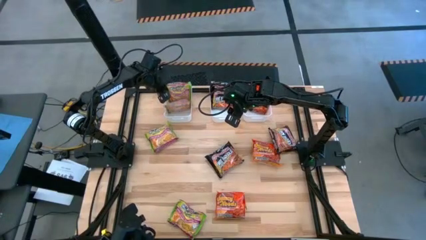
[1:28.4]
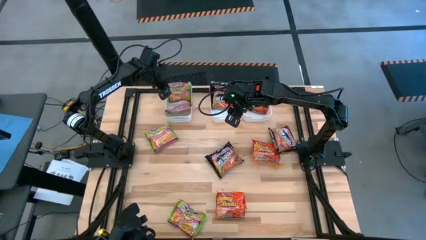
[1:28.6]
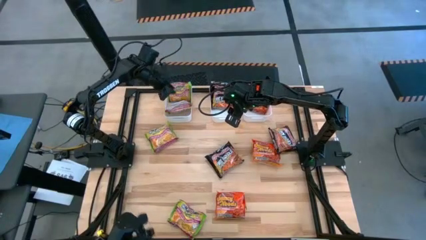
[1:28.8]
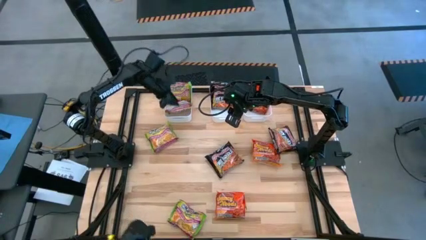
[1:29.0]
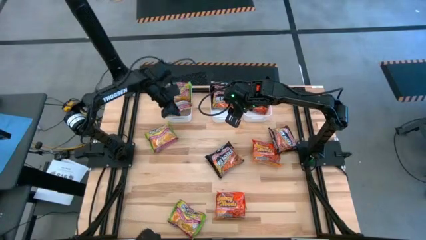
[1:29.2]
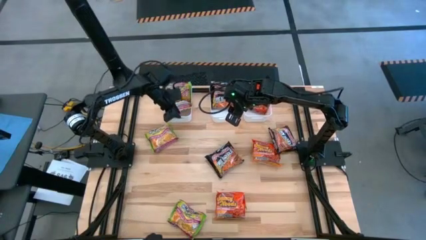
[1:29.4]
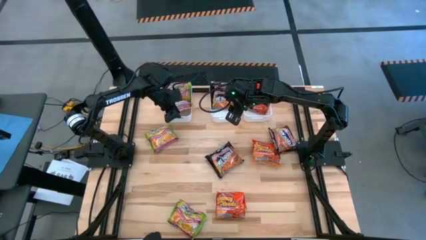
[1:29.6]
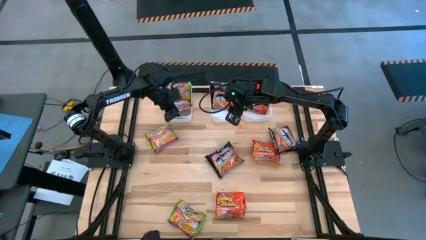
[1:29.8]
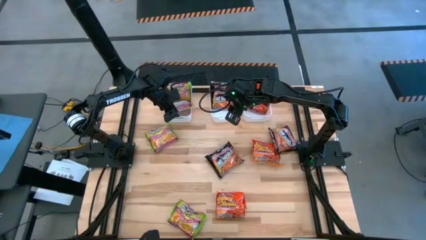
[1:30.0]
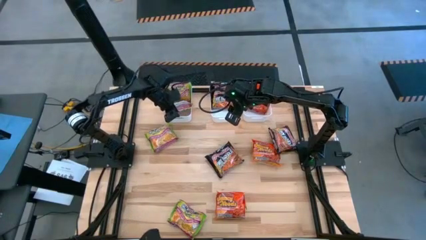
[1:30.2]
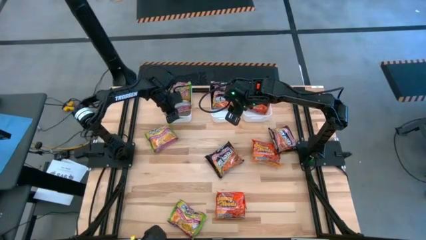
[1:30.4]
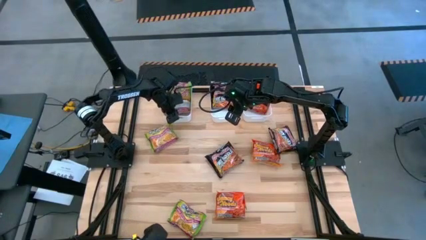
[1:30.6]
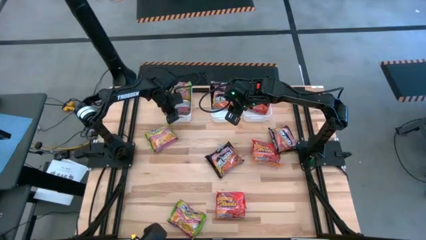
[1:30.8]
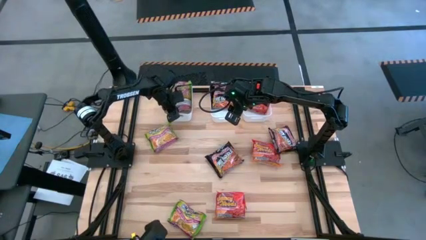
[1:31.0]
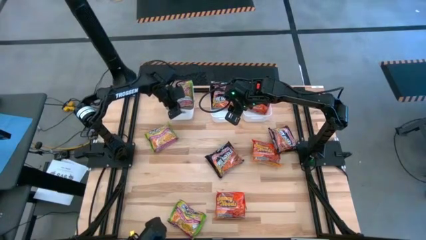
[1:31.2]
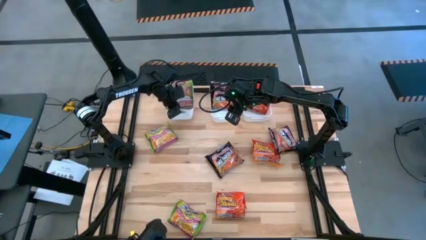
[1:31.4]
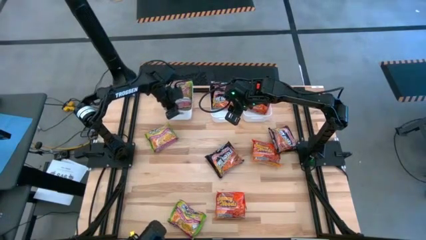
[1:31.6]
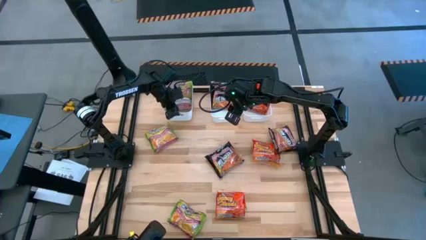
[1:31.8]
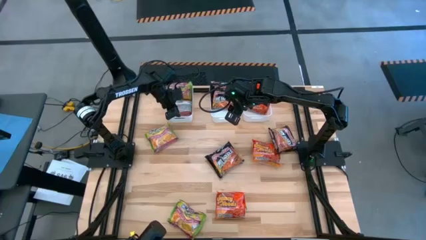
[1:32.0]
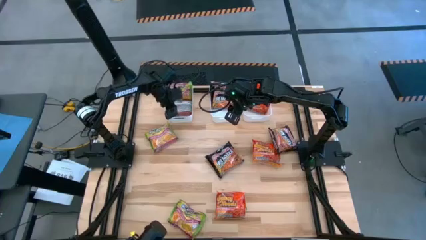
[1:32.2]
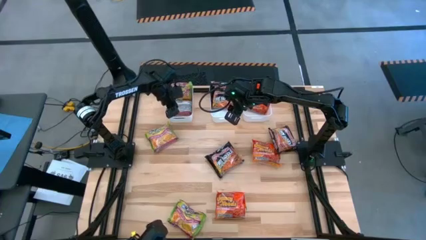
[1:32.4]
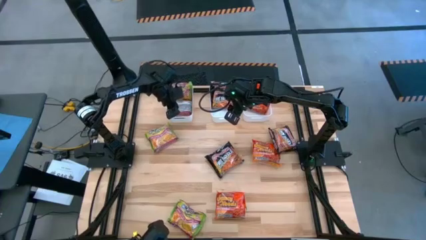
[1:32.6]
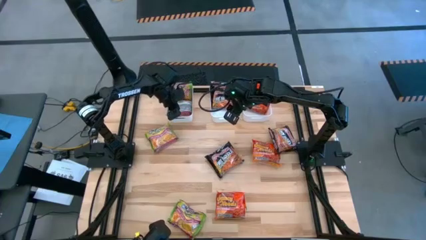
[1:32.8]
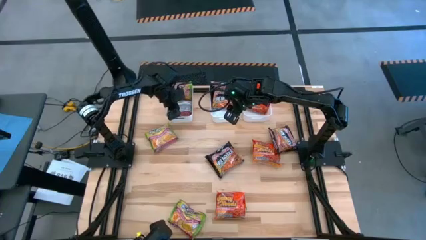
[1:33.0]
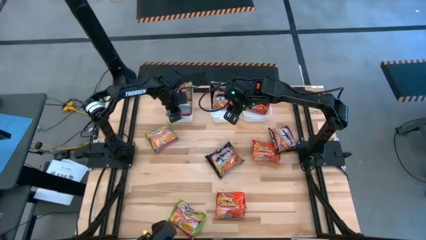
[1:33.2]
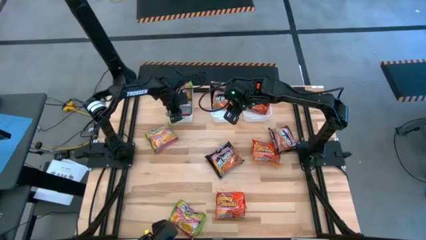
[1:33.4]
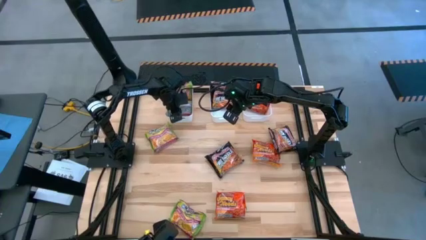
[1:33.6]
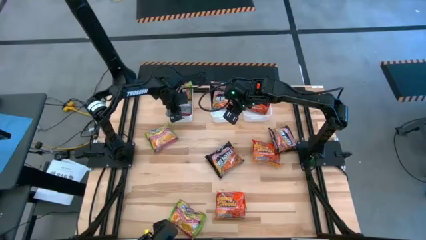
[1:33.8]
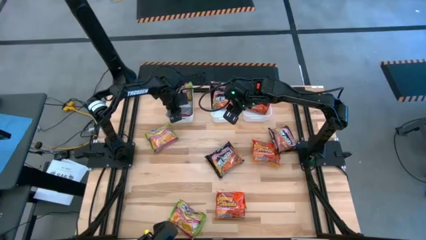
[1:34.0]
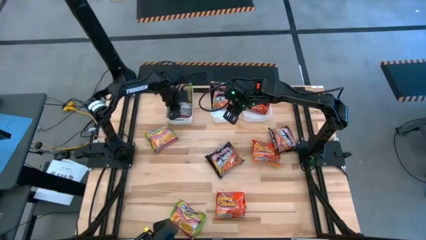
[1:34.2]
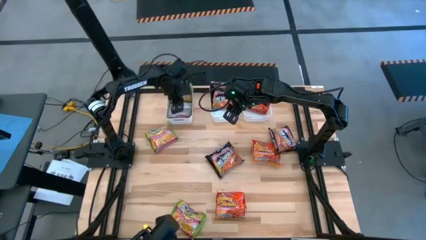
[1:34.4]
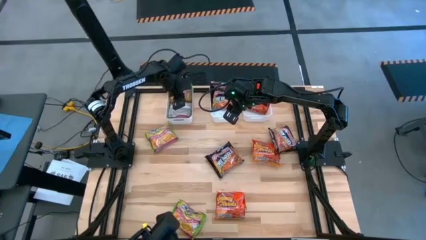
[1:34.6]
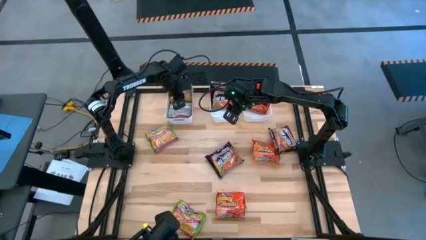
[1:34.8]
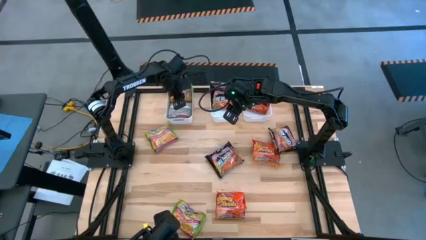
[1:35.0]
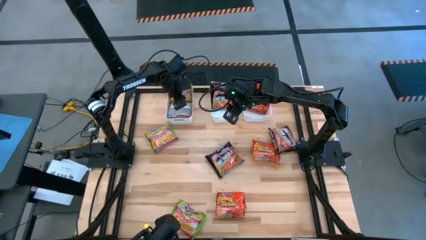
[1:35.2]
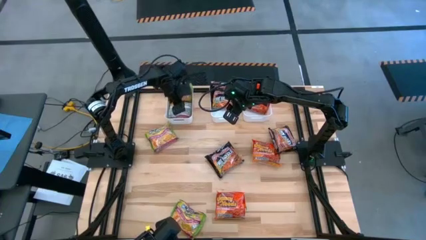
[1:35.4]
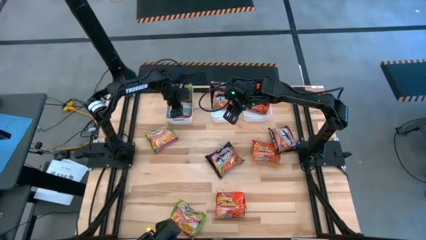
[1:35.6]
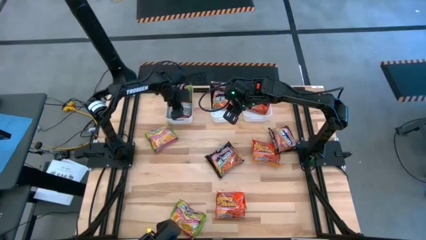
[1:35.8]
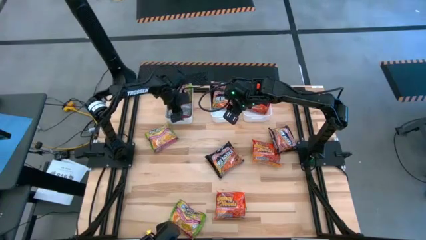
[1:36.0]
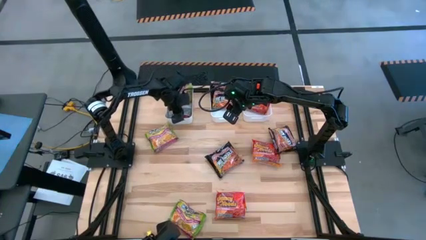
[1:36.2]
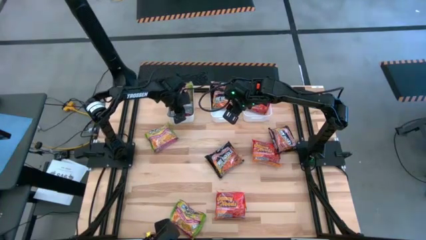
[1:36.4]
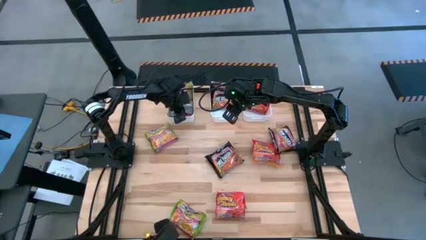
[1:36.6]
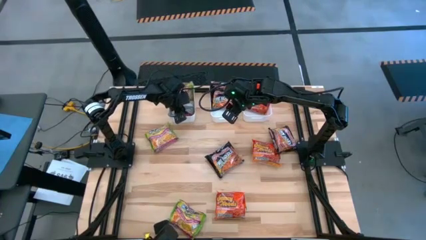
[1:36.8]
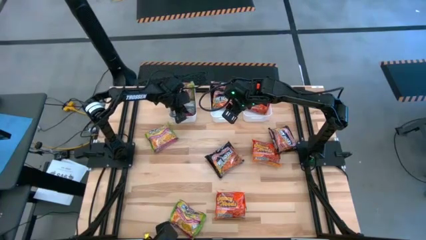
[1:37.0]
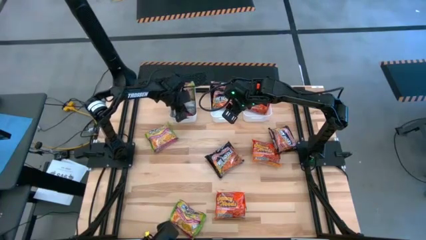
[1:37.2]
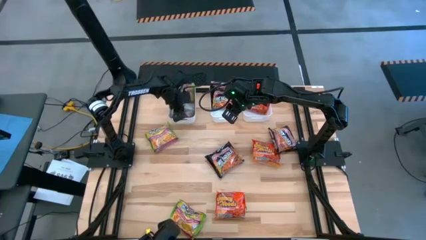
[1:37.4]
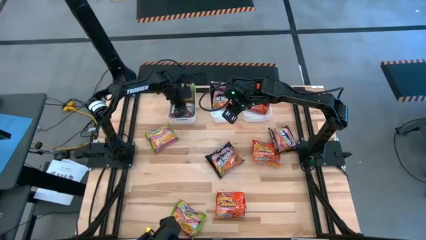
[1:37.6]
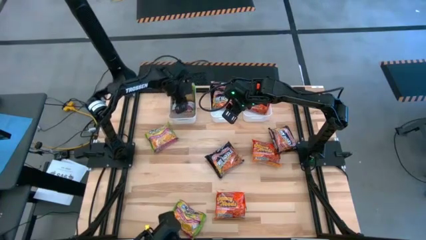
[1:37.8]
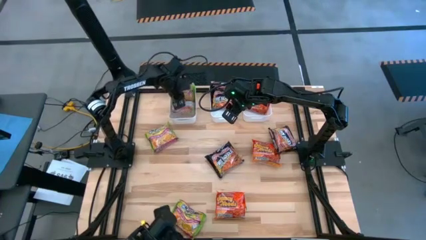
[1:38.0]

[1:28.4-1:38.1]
Task: Sort Maruchan noodles
Put the green noodle pack into the left white bin

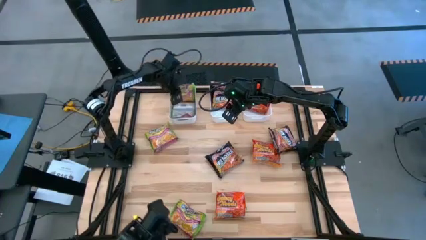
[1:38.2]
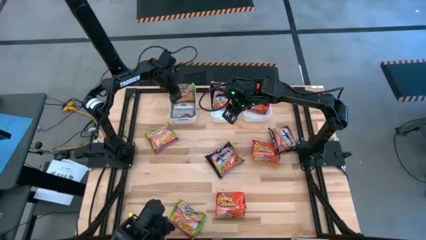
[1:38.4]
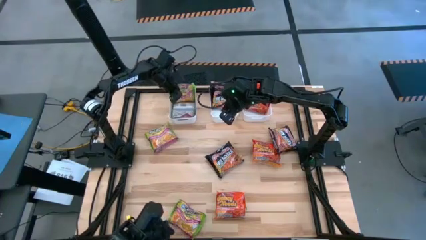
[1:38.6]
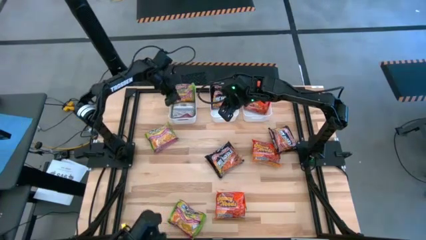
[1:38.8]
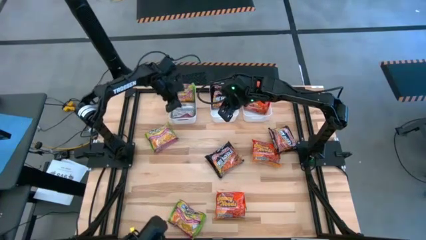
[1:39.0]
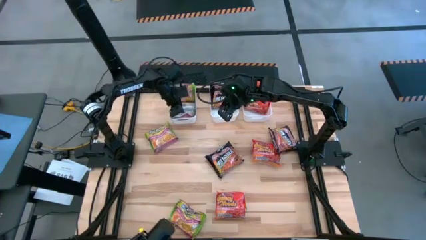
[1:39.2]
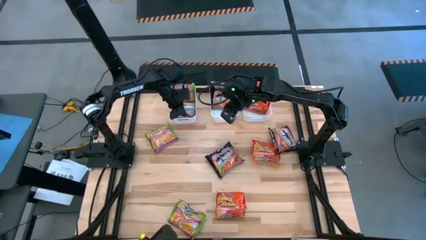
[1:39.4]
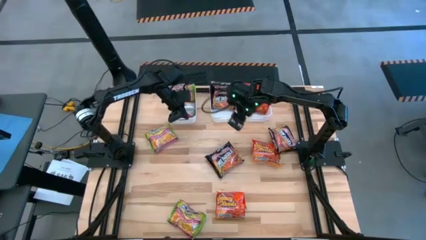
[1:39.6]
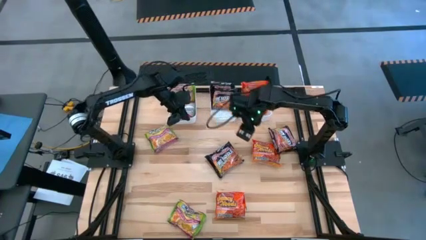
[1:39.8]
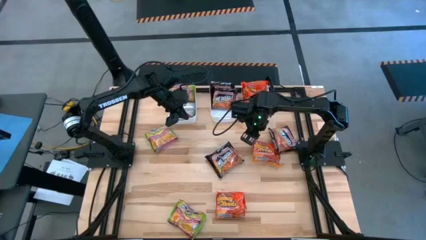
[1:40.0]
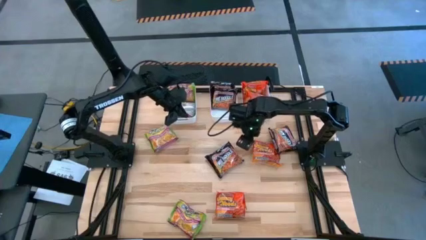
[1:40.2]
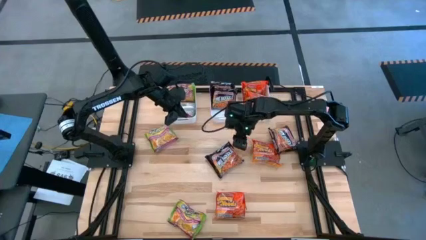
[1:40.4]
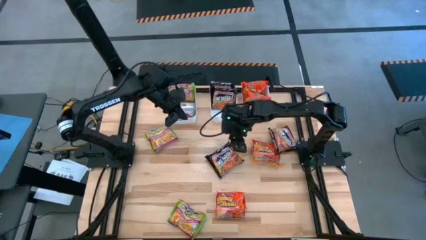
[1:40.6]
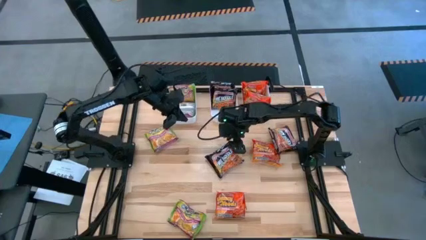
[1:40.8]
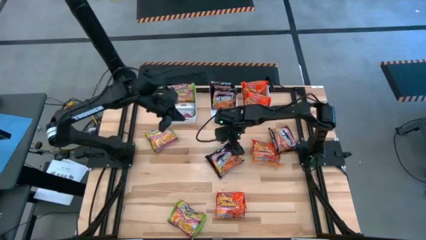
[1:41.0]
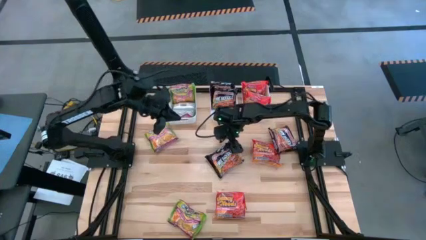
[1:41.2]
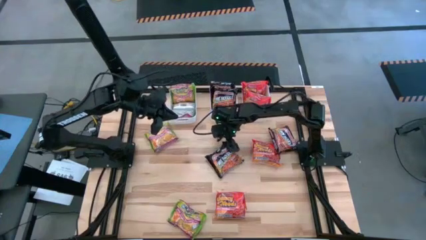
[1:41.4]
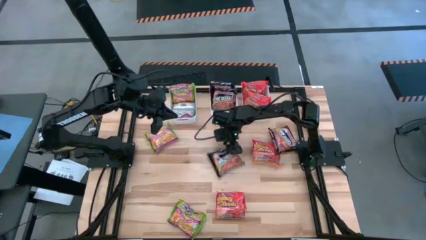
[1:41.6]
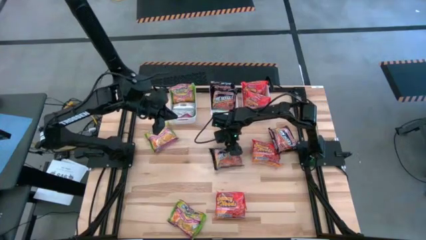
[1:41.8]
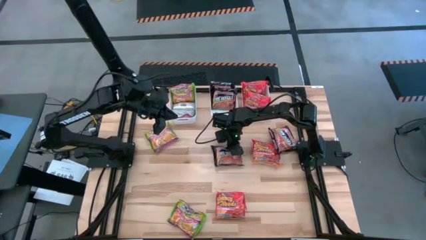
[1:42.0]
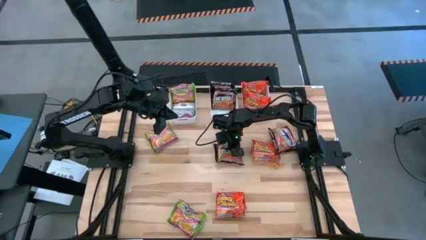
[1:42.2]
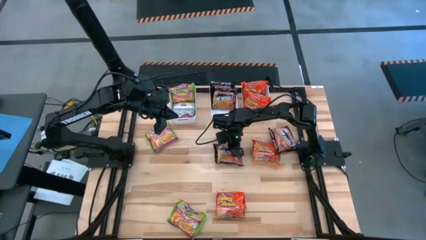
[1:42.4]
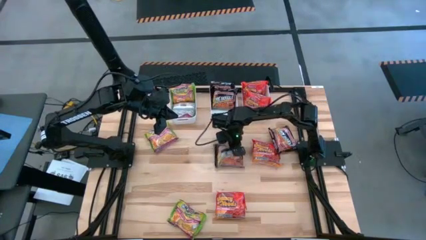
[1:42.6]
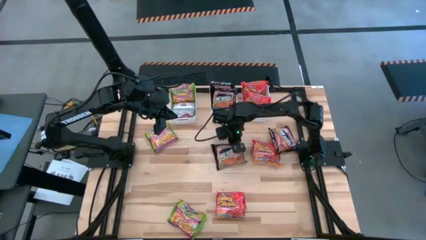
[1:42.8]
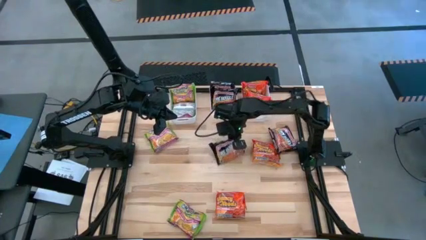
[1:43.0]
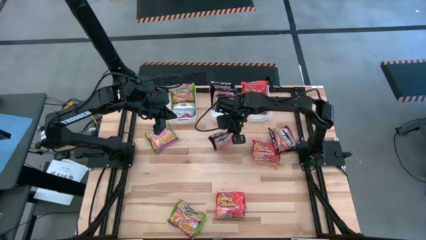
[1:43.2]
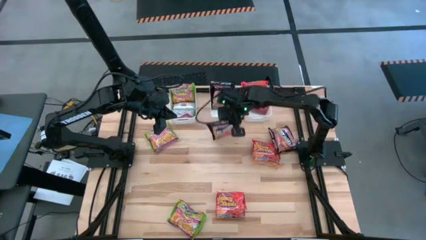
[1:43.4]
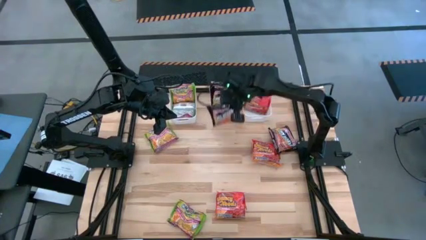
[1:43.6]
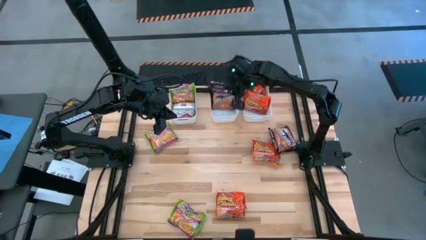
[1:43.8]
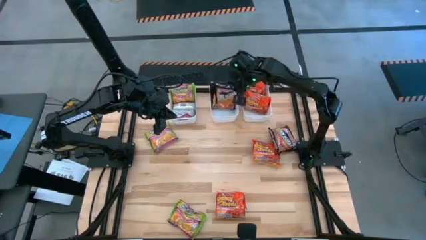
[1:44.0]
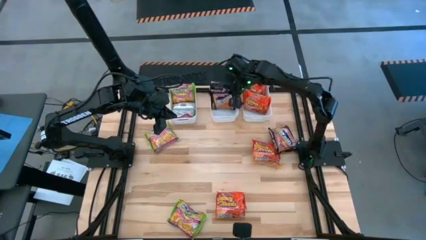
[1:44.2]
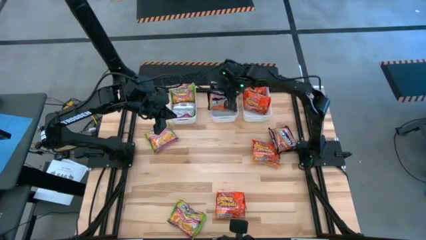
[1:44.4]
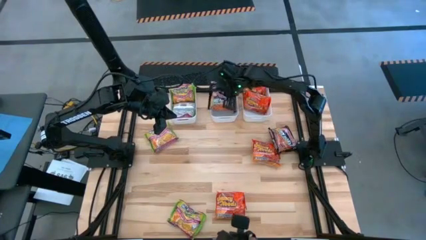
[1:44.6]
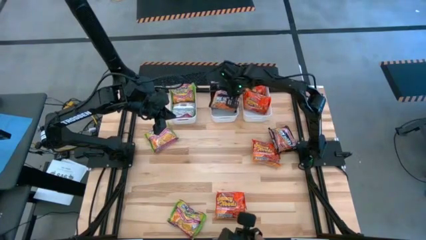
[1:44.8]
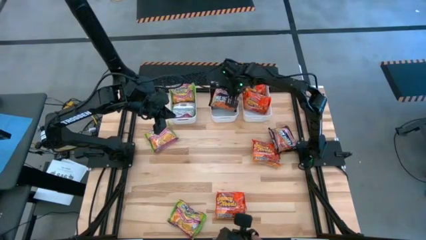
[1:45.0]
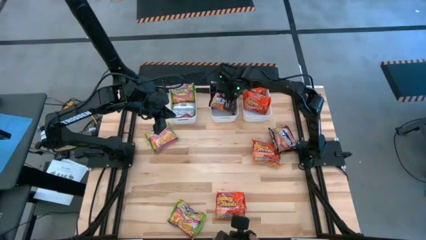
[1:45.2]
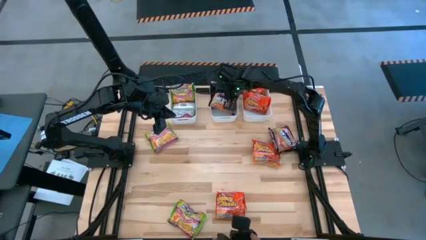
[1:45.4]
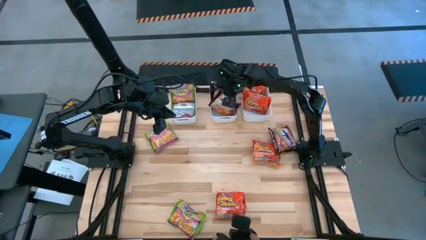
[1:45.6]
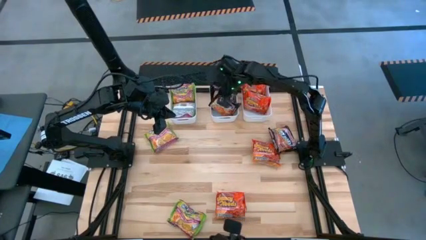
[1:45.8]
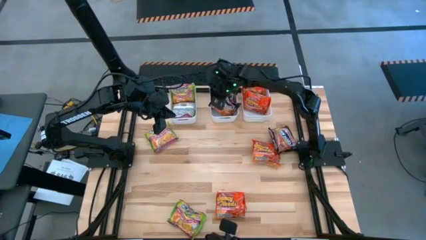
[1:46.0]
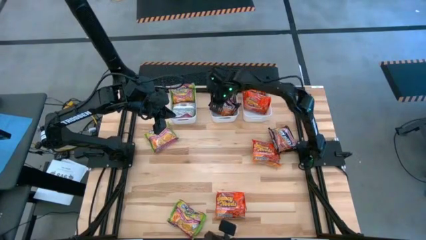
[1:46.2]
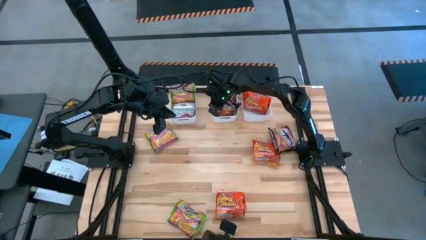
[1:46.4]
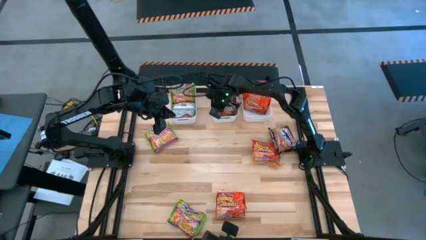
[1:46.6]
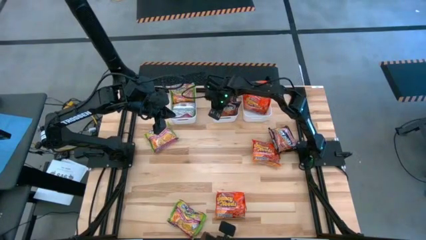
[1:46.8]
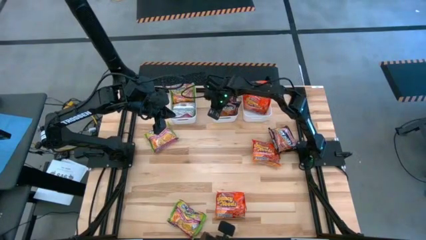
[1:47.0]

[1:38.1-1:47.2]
Put the black noodle pack into the middle white bin
